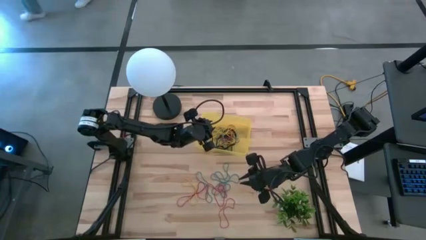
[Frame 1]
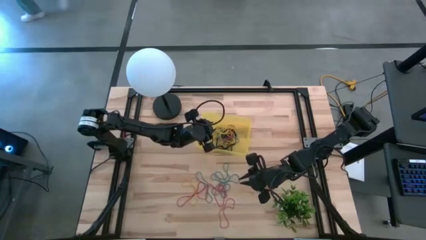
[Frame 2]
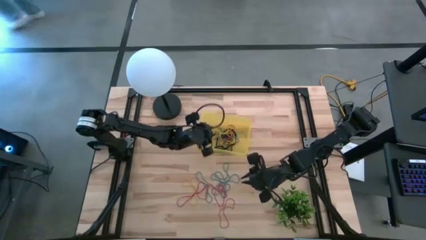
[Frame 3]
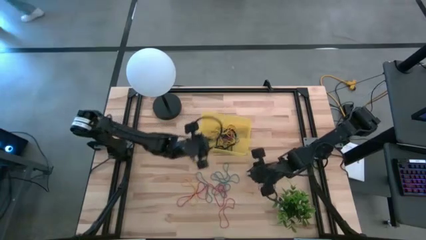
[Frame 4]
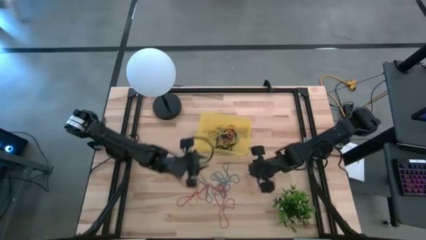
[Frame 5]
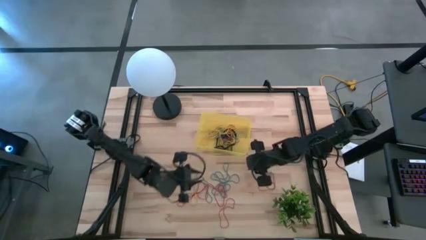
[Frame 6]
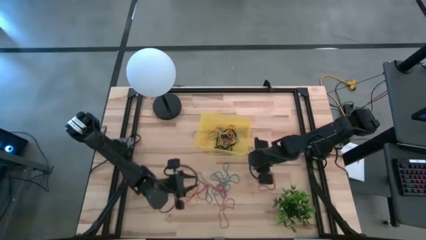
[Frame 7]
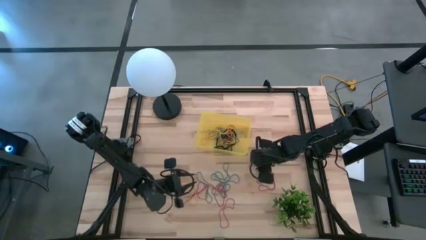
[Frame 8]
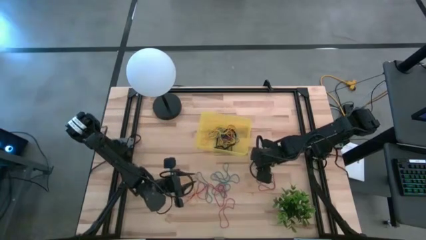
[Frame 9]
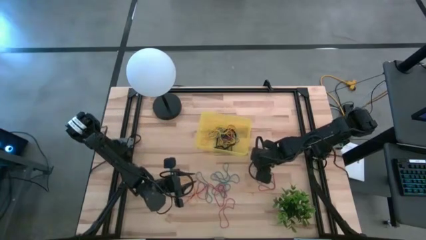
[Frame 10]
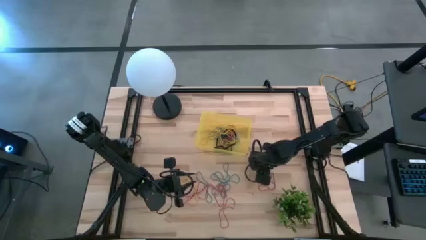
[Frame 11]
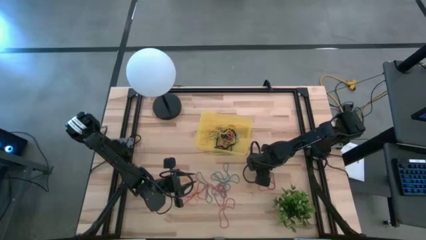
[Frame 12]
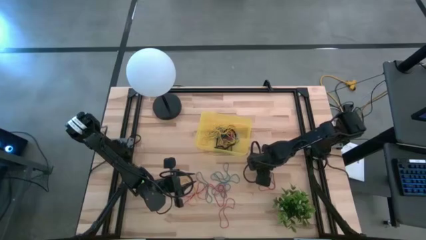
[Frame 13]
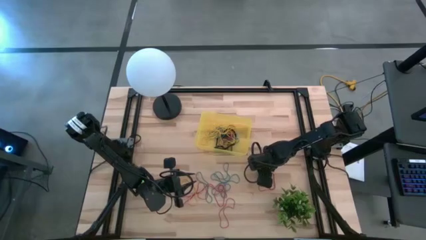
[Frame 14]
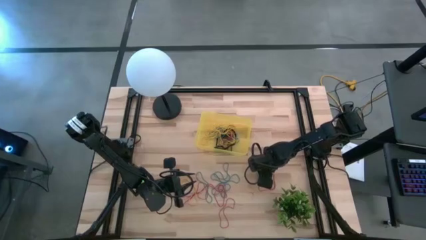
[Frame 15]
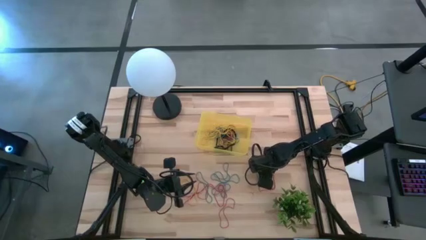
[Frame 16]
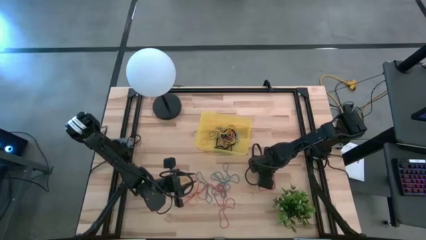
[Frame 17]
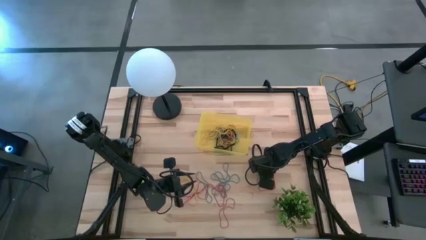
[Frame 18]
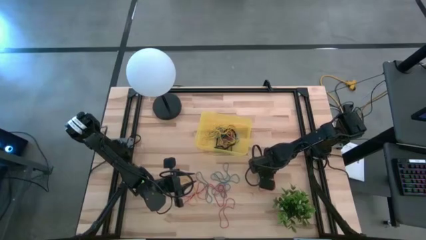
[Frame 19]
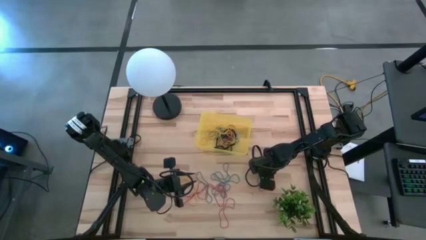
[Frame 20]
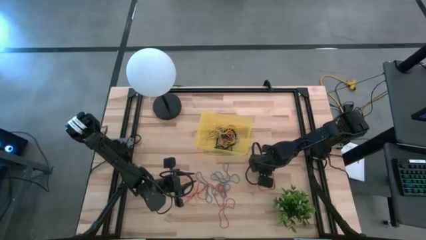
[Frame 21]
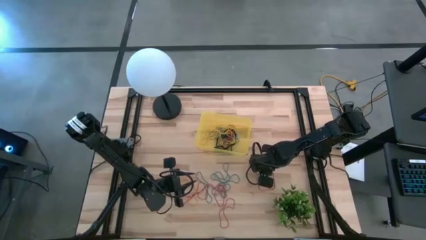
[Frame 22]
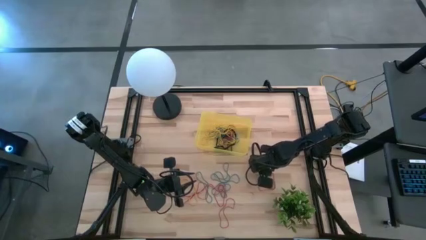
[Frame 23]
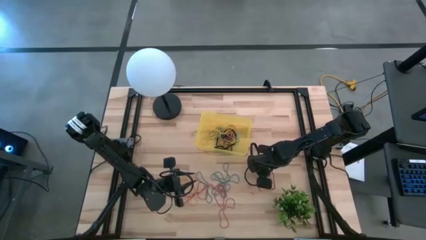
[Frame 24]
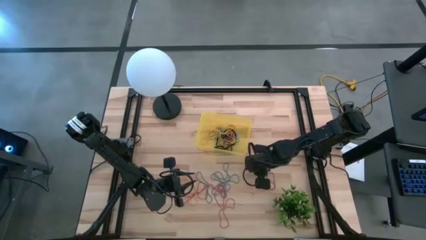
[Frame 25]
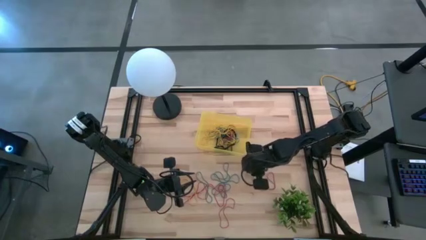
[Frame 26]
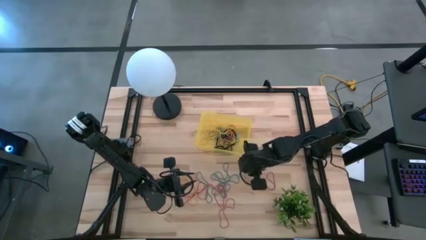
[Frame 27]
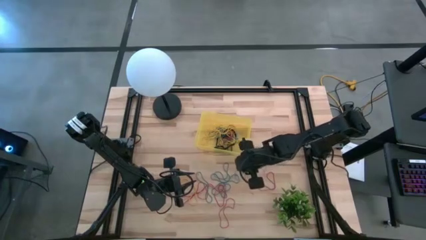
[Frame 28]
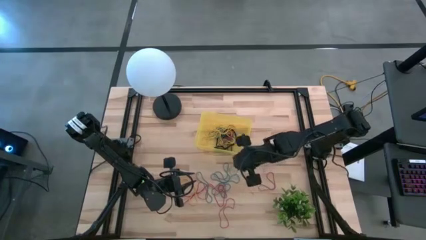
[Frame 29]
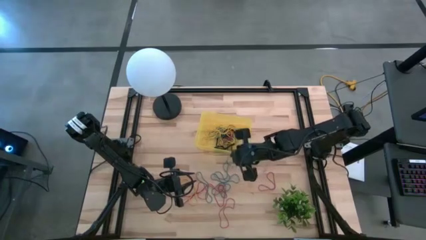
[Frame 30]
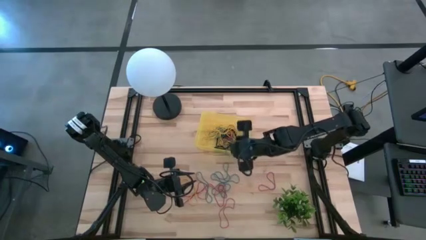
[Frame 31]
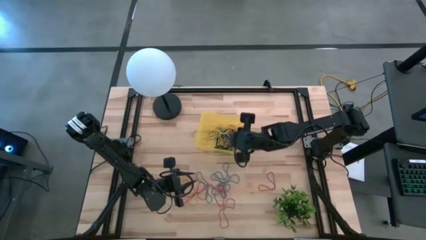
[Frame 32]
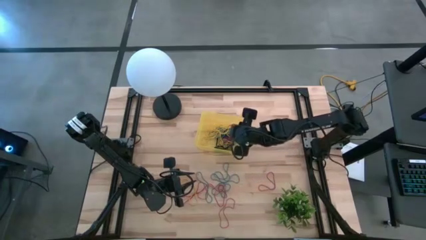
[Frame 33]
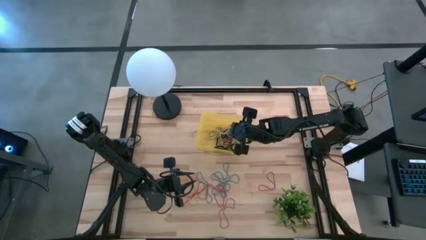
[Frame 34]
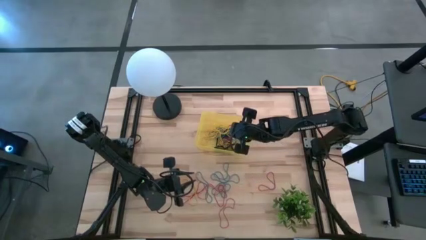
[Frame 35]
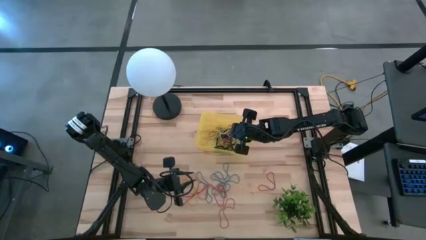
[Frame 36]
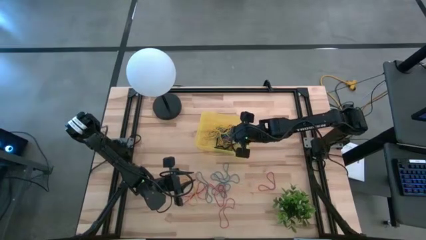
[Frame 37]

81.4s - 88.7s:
Task: Pick and place rubber bands into bin
Put the blue rubber band into the yellow bin

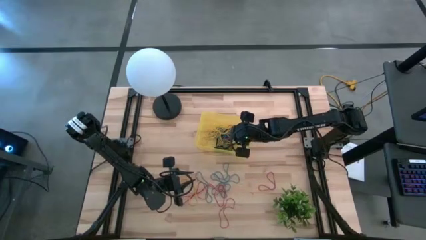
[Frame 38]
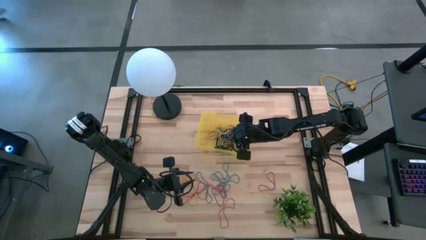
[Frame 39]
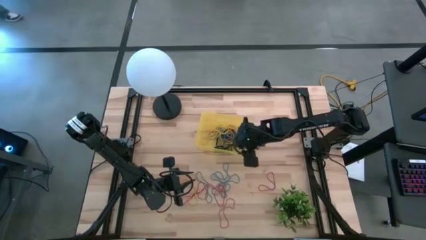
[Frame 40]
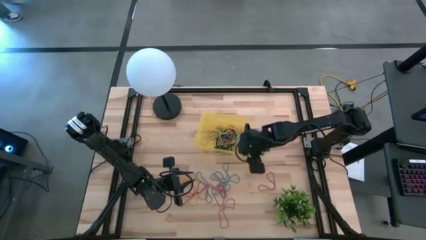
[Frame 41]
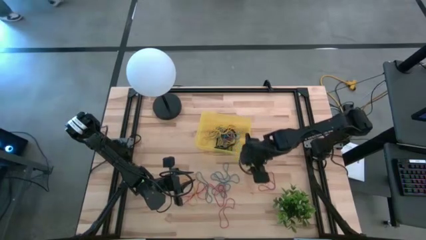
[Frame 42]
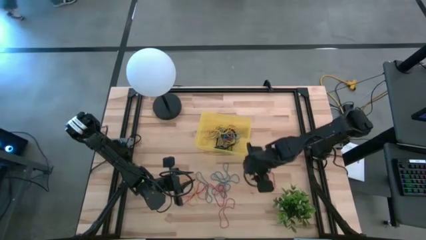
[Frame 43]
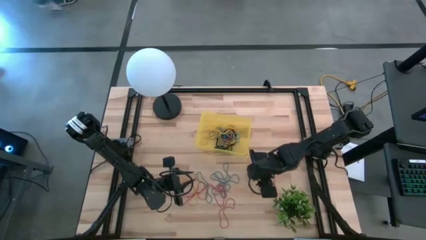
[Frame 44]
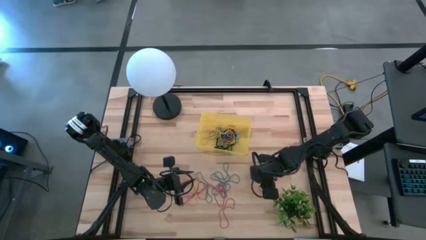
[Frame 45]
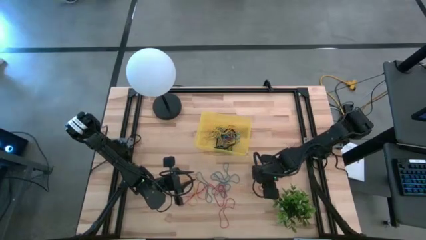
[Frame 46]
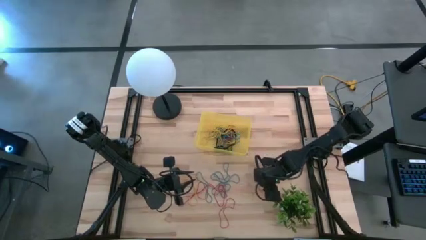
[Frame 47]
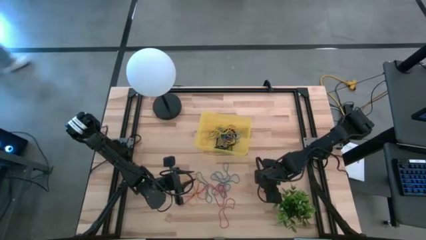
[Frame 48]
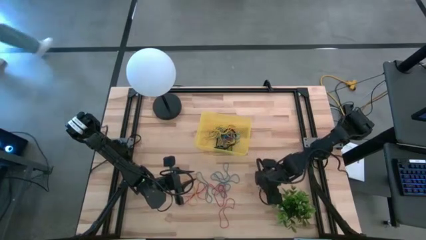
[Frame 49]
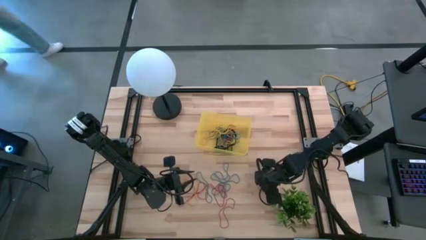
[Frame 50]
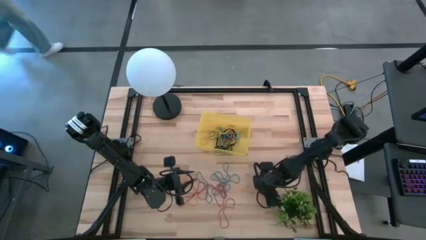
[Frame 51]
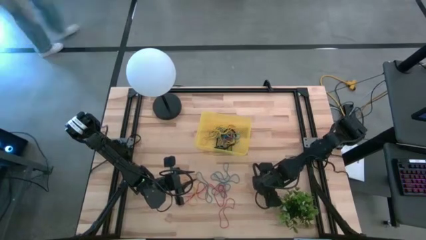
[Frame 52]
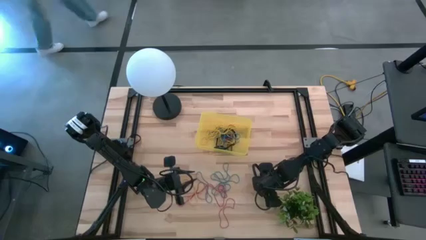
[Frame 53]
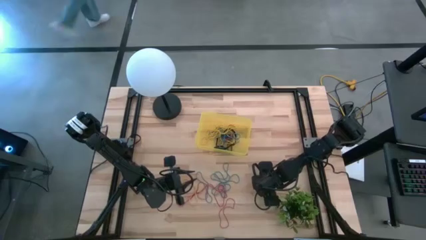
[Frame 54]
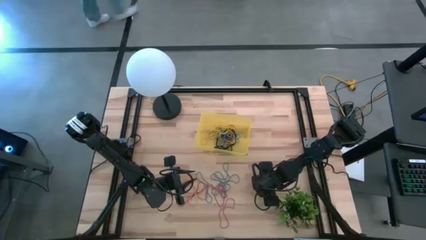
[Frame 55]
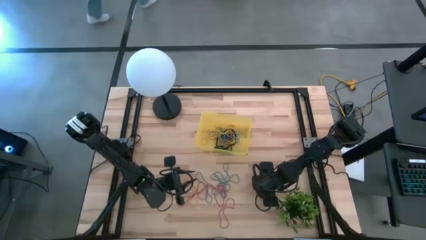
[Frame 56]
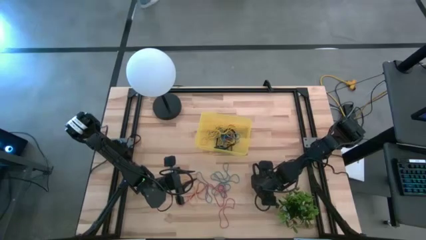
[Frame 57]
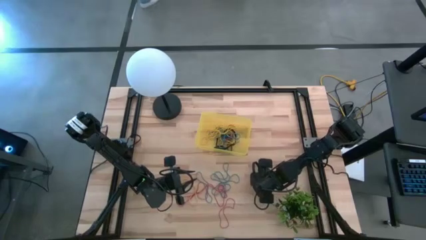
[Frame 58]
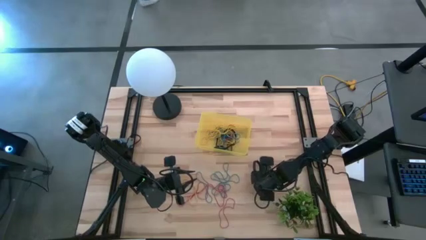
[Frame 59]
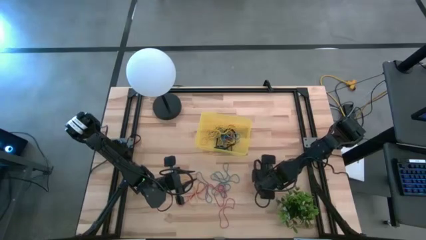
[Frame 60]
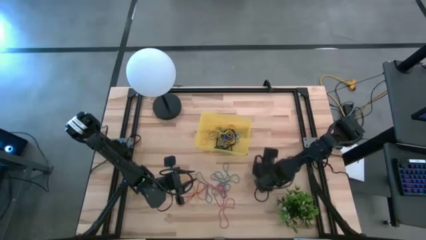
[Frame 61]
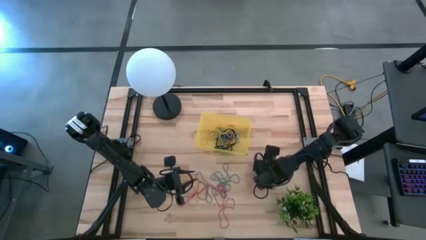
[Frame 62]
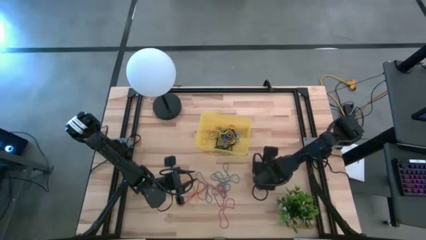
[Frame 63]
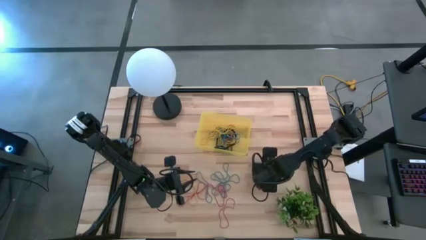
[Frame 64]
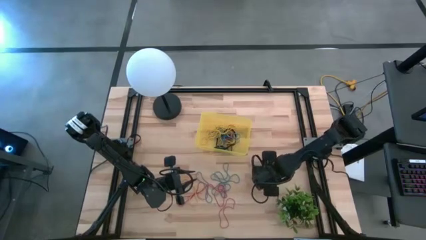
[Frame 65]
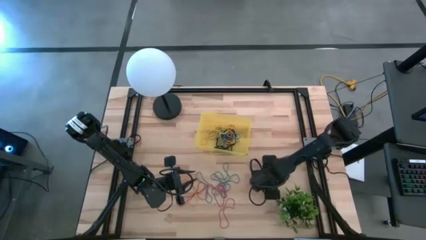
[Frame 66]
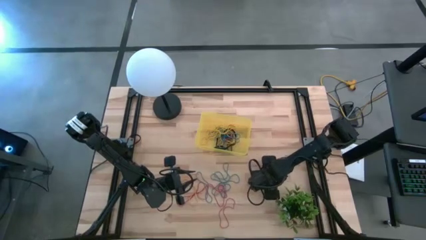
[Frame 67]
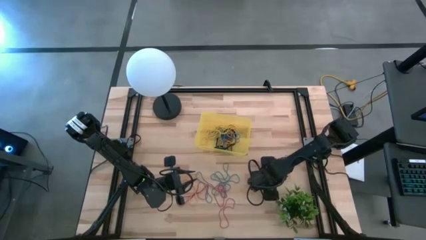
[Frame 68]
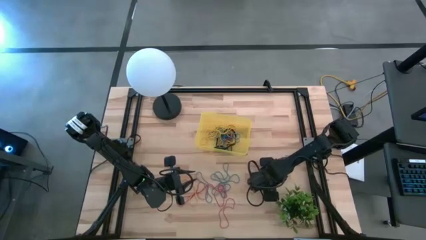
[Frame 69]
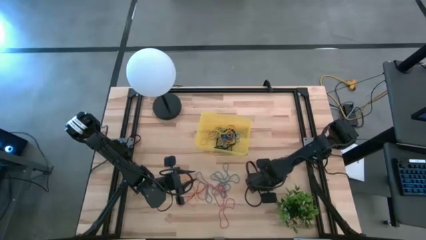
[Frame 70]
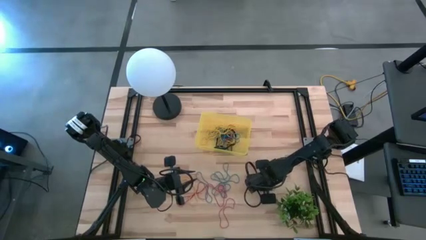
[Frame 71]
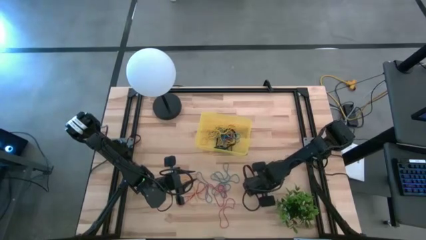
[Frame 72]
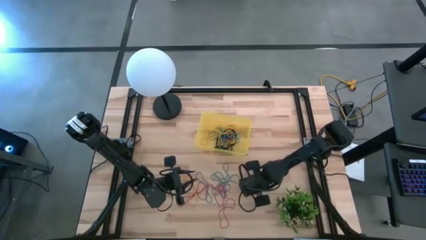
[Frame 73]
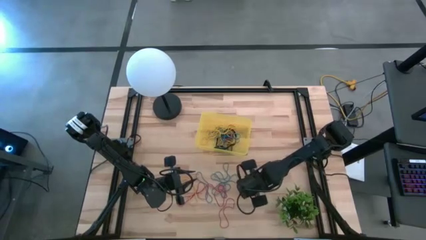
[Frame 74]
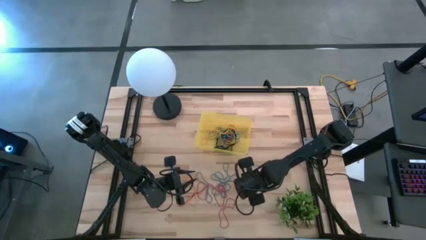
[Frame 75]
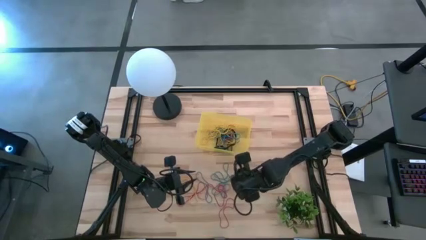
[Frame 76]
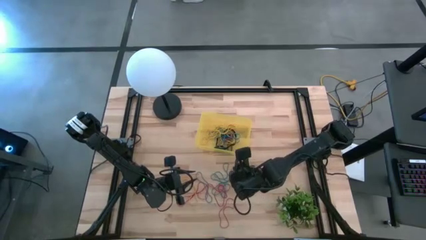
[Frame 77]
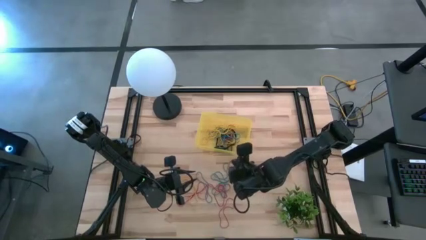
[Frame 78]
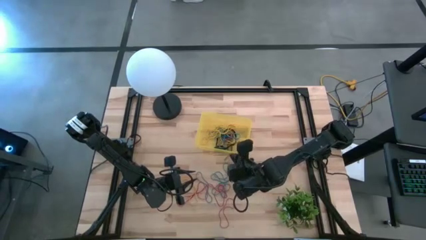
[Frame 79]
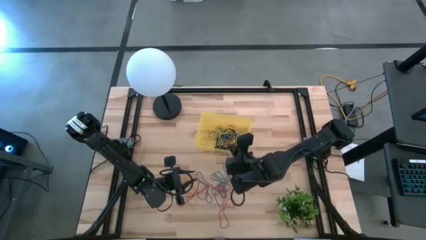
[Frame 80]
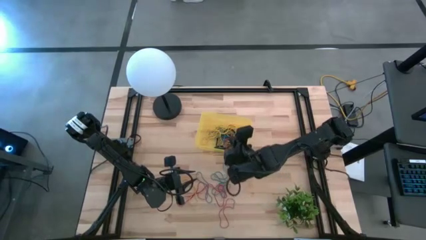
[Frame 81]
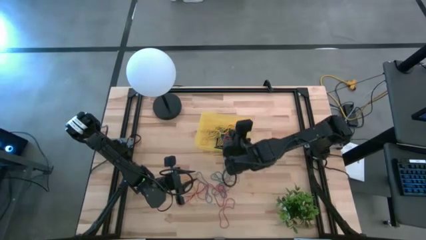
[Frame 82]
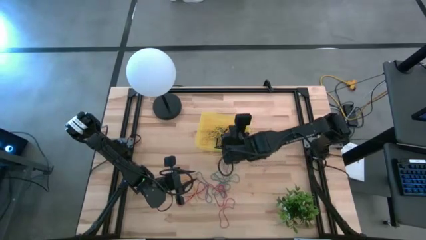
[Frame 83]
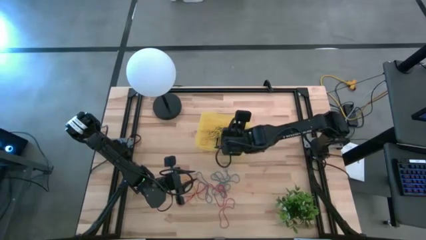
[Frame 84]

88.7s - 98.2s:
Put the red rubber band into the yellow bin

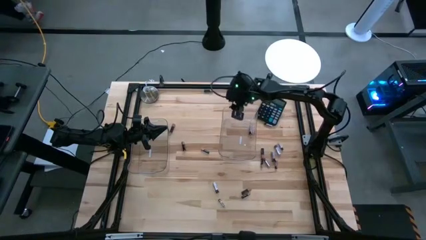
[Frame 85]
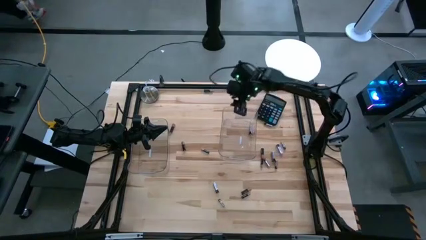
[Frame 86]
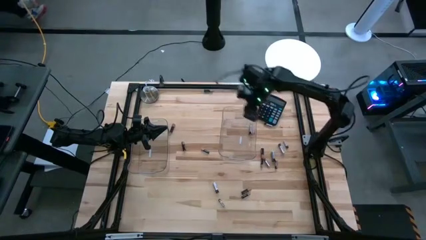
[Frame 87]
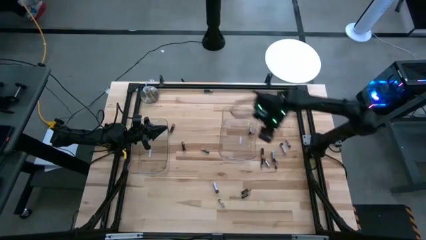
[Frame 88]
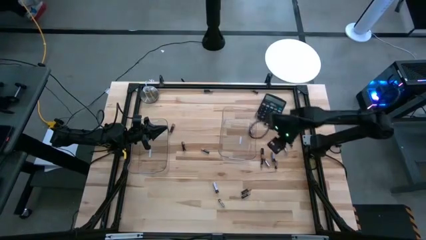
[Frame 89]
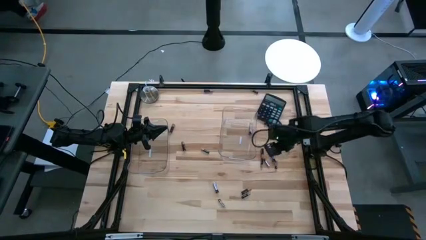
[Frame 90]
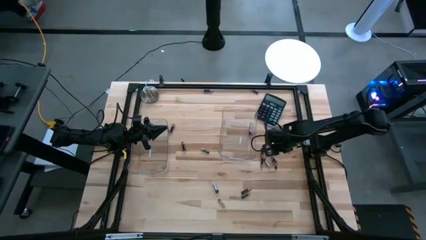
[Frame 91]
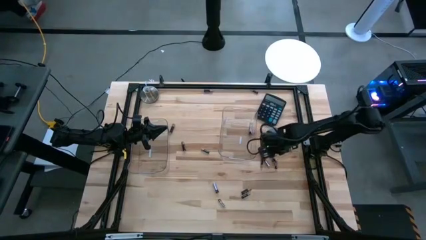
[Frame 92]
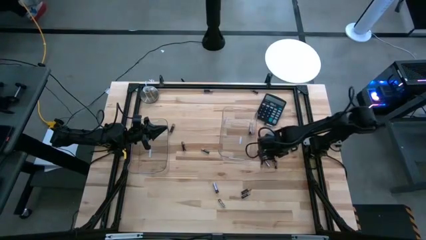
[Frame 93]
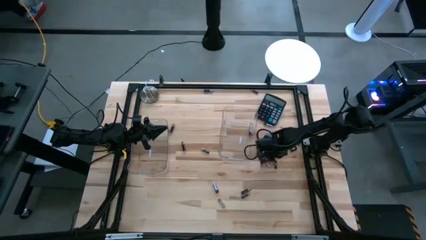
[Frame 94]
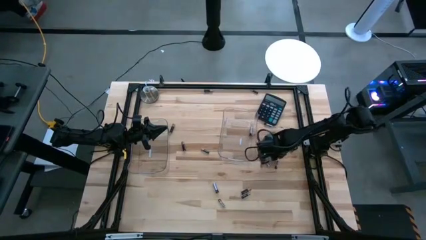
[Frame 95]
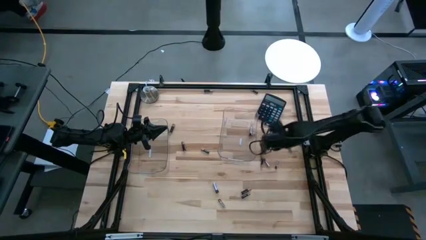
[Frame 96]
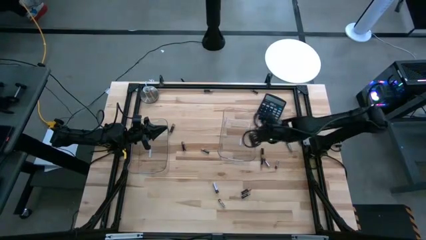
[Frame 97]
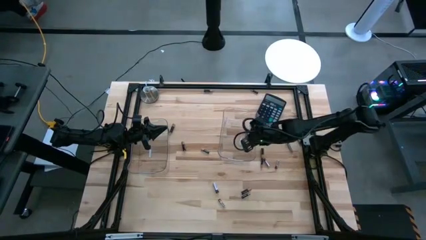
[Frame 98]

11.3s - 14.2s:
Task: Sort batteries
Put the silver battery into the right transparent bin
